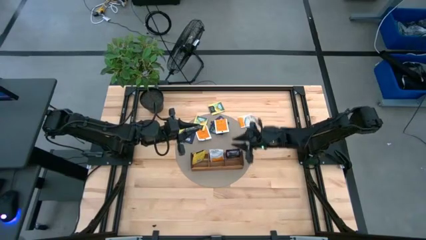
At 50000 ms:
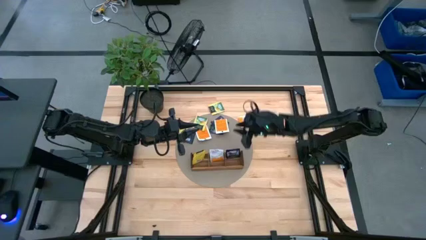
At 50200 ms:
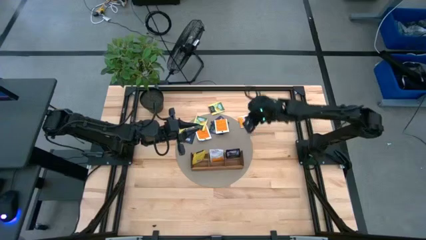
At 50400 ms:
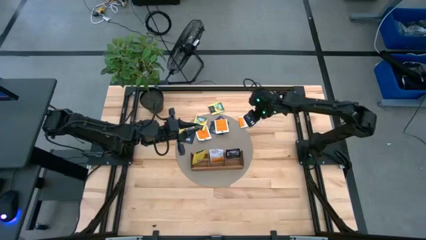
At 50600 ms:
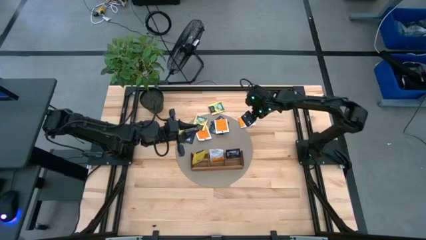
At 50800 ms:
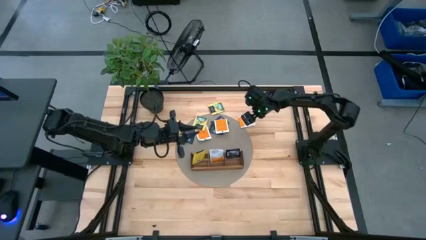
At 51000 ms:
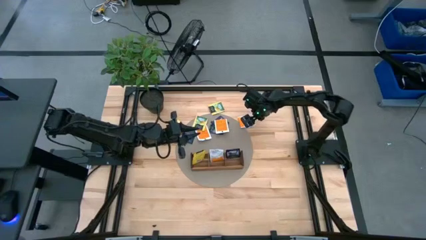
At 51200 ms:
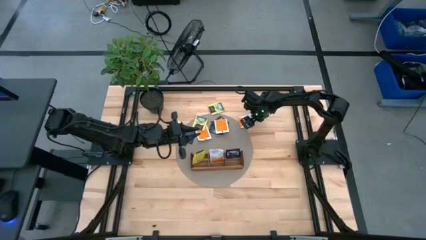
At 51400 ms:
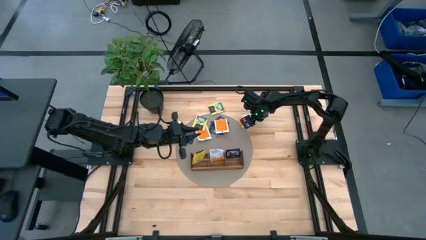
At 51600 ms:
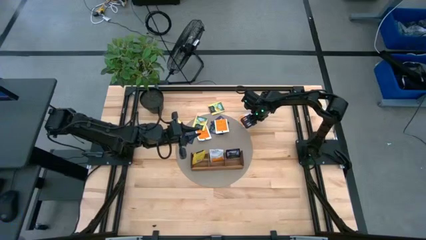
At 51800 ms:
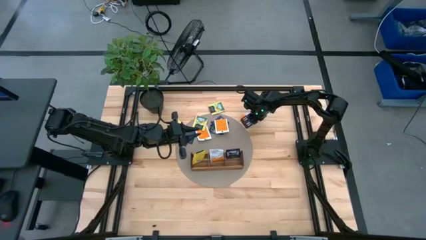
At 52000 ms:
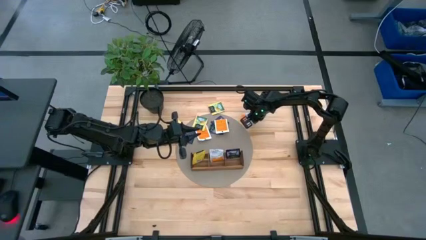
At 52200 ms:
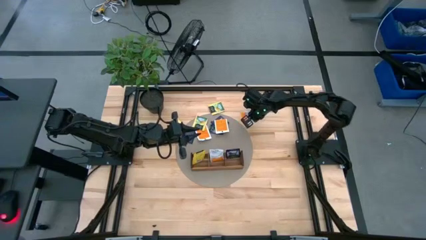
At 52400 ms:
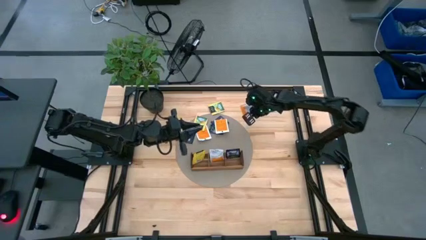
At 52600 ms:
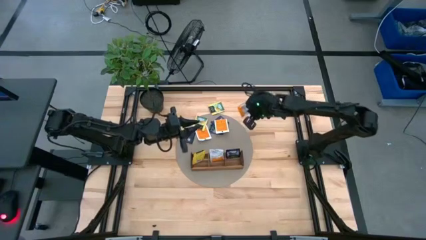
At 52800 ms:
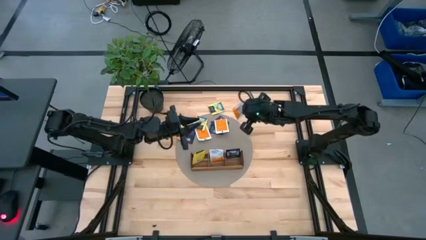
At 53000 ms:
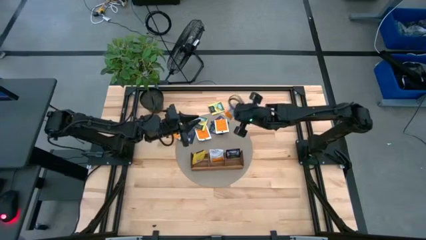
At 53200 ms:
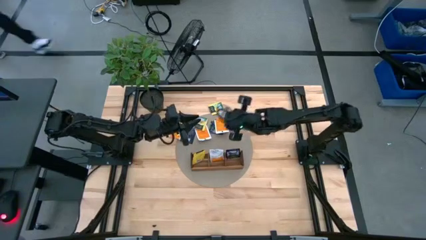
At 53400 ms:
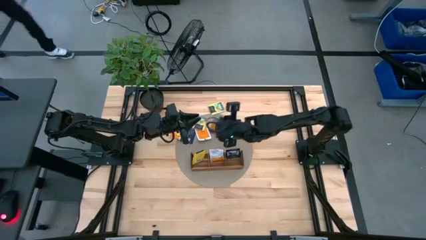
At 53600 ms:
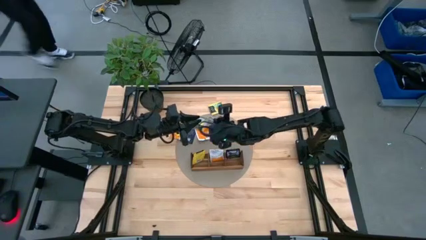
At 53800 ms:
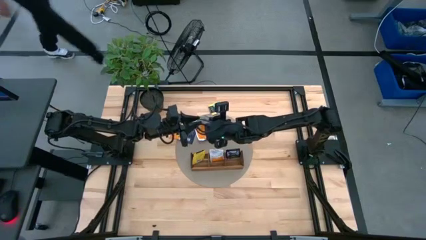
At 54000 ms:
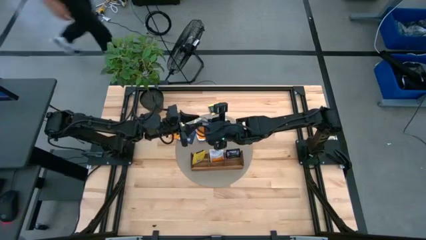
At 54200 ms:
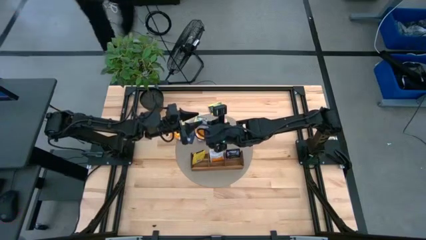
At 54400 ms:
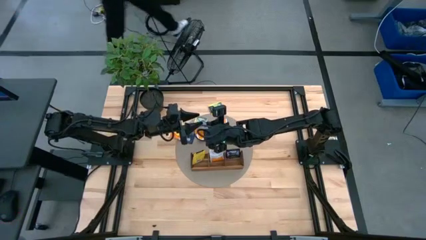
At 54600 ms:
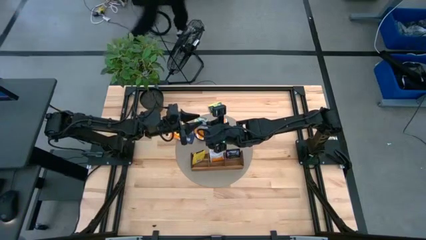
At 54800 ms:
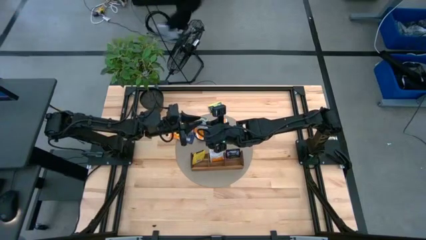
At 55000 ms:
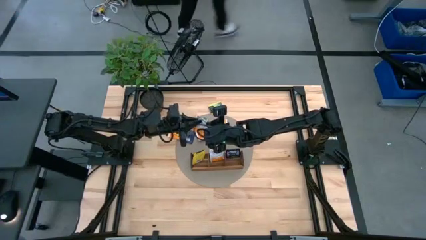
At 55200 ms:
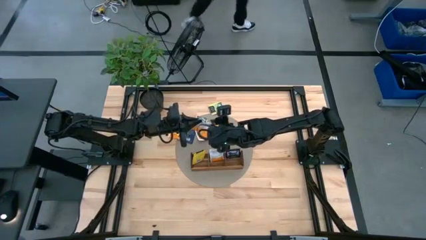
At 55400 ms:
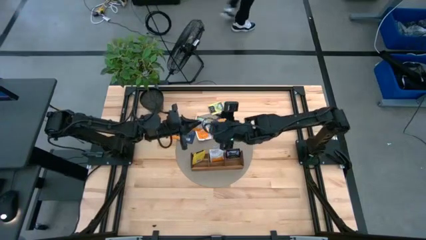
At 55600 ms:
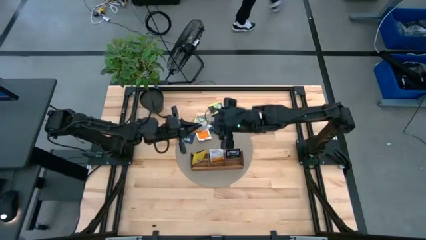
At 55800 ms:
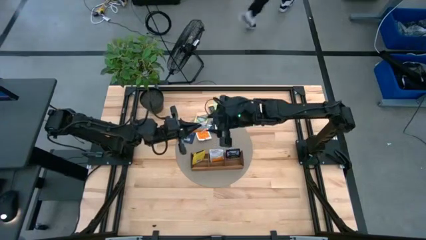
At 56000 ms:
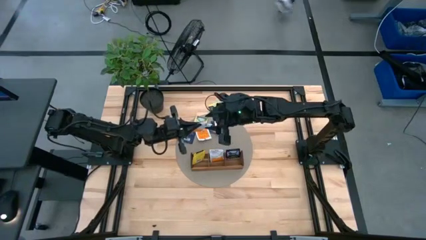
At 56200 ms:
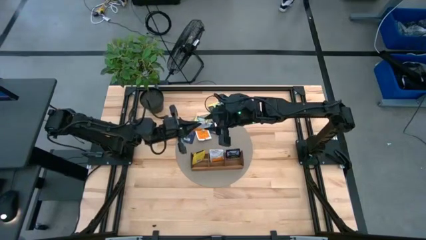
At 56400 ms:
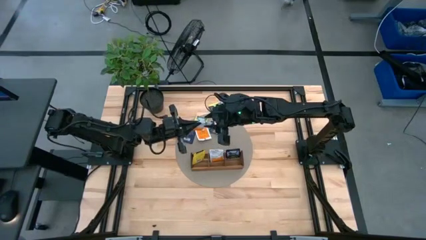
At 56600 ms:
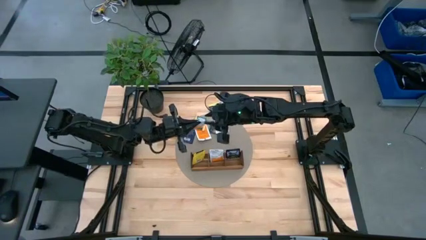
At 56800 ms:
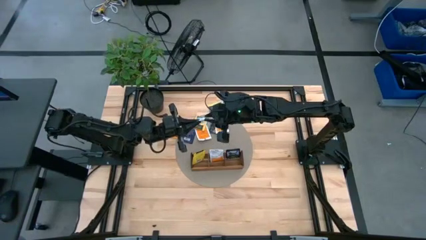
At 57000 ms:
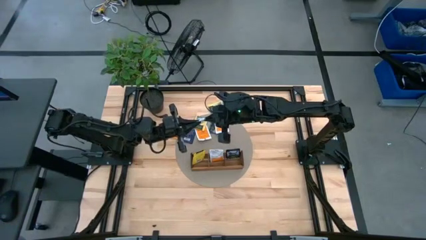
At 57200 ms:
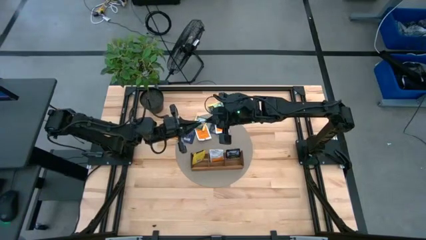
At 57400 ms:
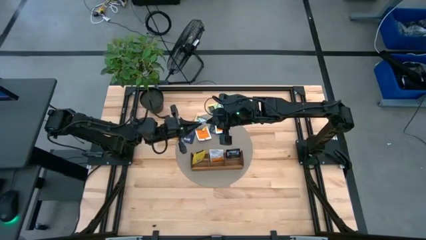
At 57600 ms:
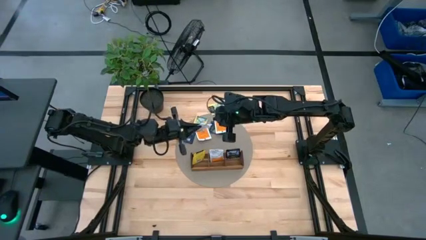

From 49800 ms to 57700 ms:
Task: Pick & Place Tea
Put the orange tea bag into the middle section of the wooden organizer

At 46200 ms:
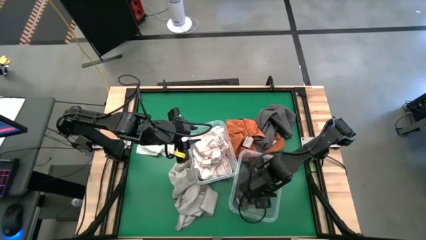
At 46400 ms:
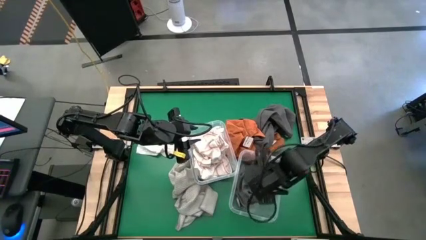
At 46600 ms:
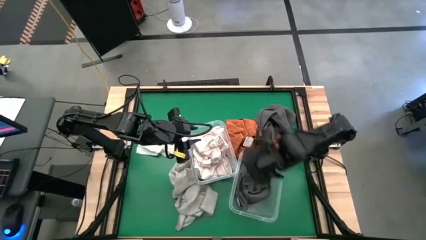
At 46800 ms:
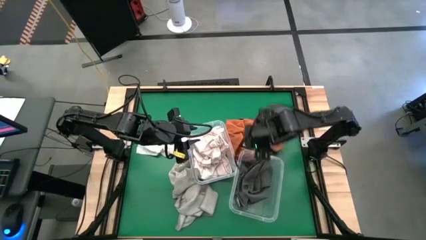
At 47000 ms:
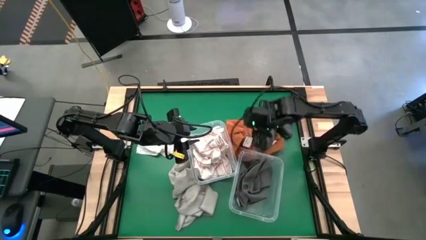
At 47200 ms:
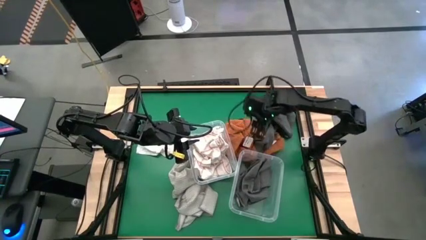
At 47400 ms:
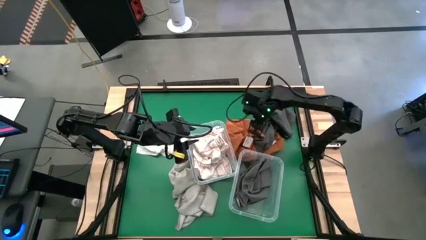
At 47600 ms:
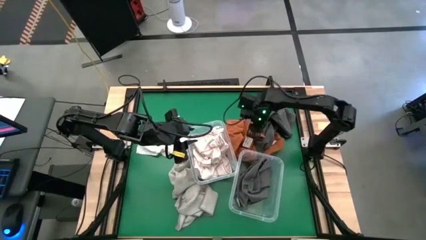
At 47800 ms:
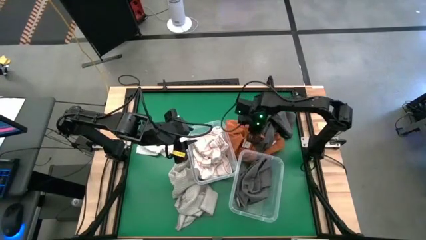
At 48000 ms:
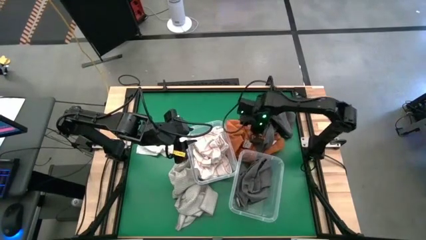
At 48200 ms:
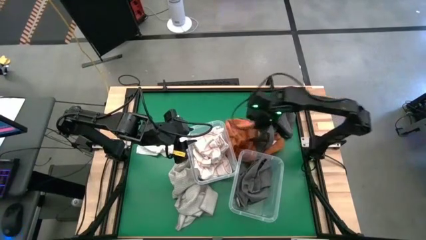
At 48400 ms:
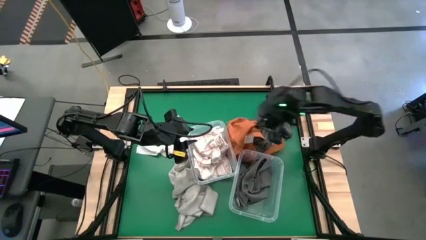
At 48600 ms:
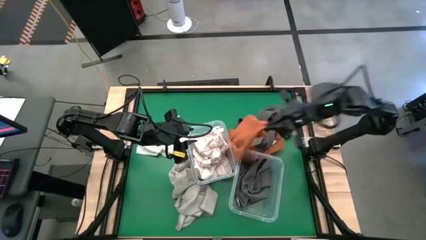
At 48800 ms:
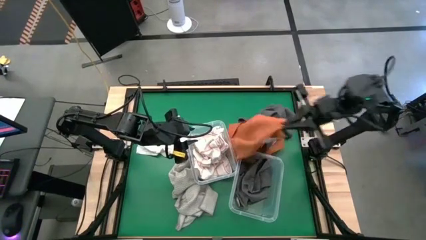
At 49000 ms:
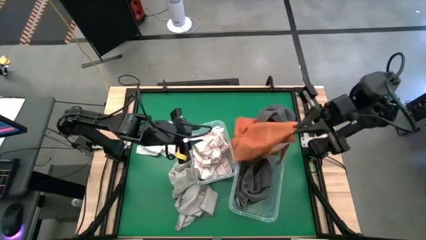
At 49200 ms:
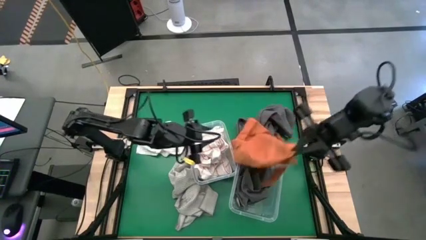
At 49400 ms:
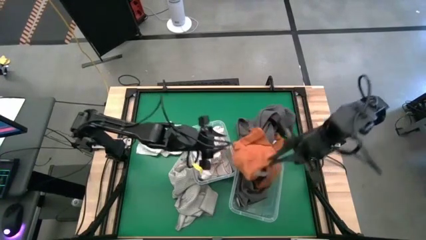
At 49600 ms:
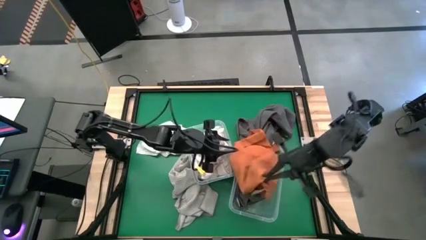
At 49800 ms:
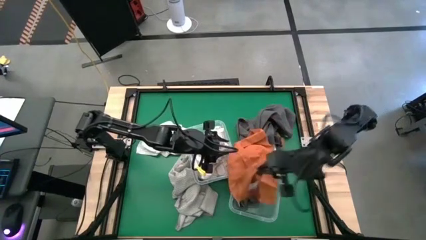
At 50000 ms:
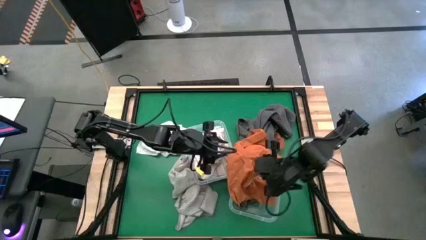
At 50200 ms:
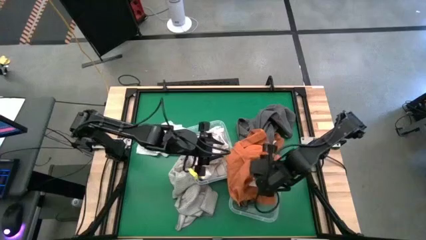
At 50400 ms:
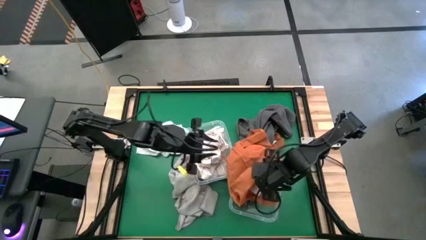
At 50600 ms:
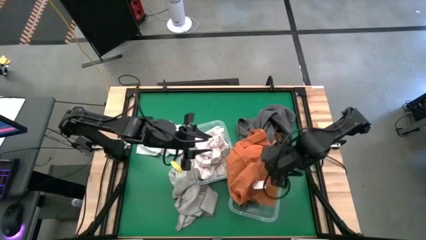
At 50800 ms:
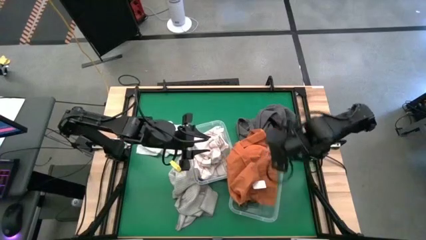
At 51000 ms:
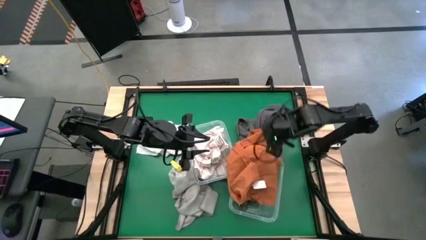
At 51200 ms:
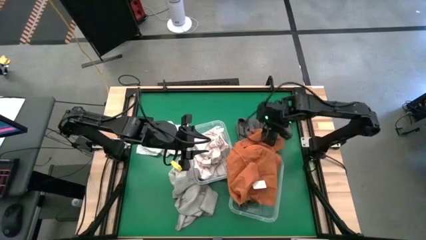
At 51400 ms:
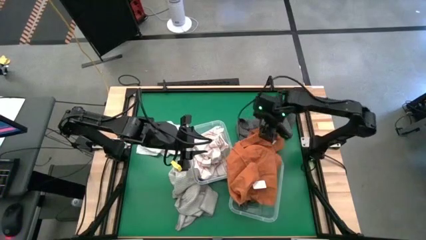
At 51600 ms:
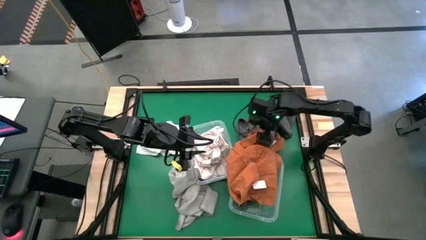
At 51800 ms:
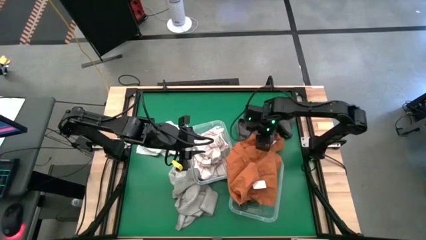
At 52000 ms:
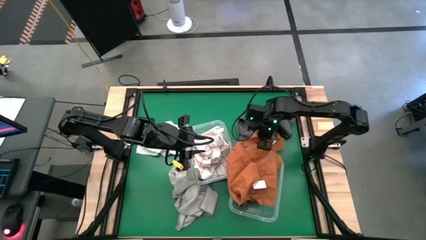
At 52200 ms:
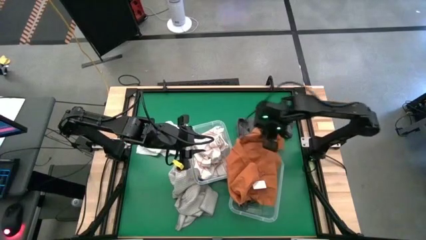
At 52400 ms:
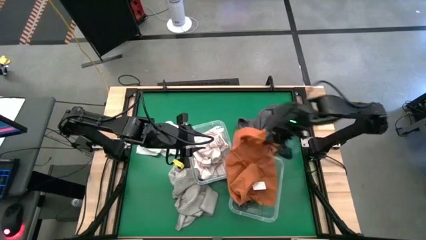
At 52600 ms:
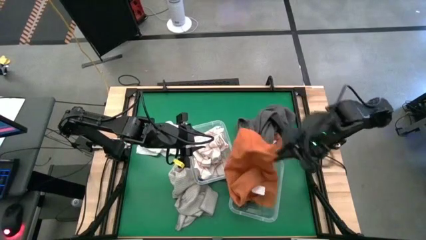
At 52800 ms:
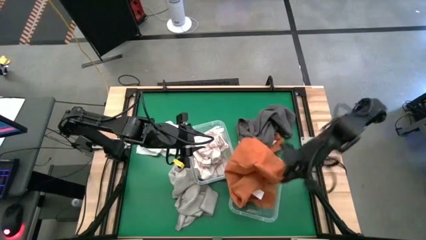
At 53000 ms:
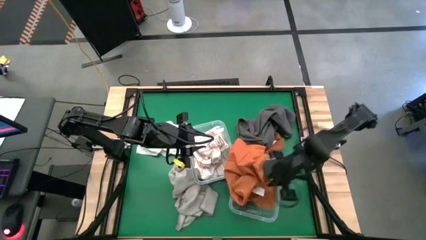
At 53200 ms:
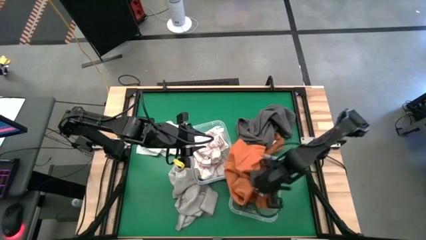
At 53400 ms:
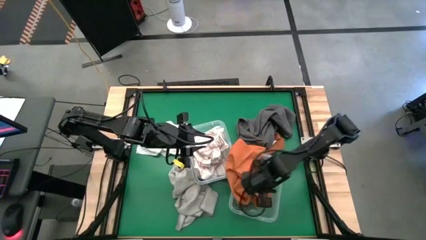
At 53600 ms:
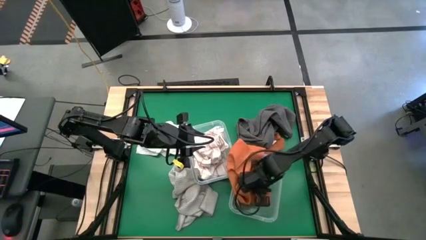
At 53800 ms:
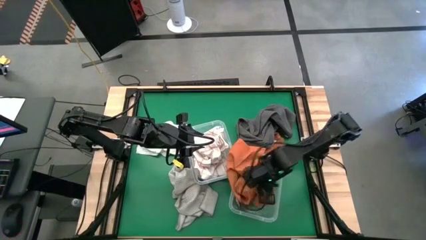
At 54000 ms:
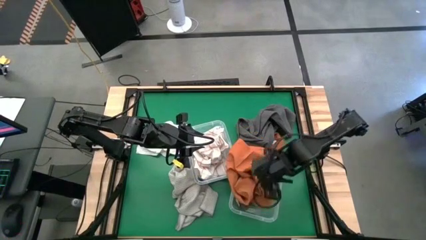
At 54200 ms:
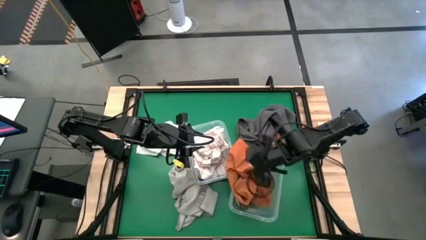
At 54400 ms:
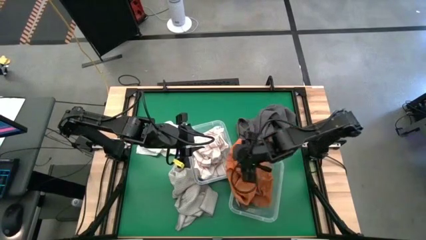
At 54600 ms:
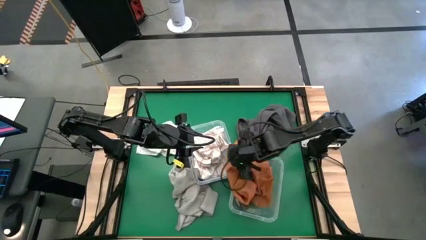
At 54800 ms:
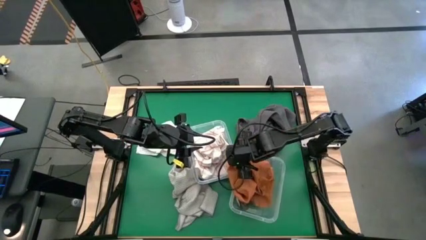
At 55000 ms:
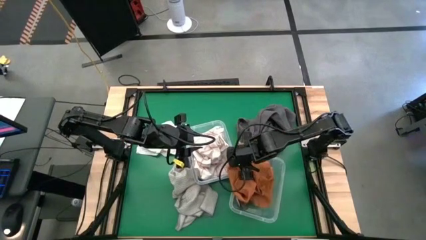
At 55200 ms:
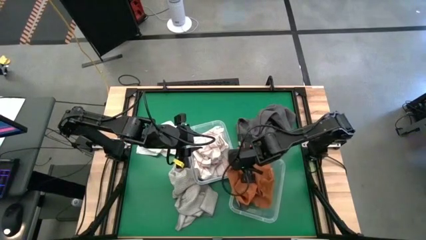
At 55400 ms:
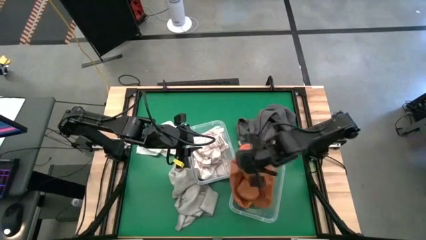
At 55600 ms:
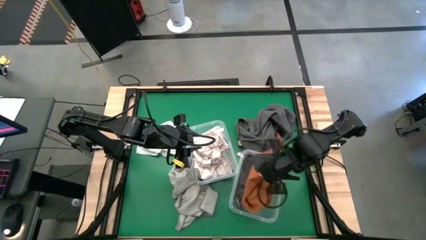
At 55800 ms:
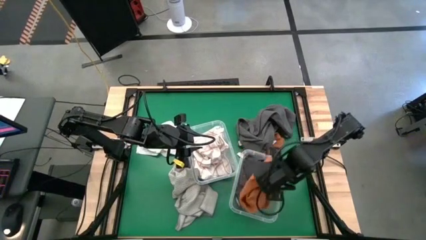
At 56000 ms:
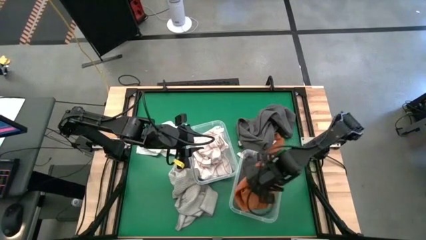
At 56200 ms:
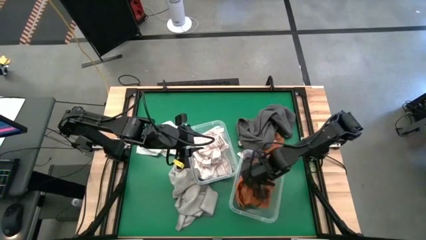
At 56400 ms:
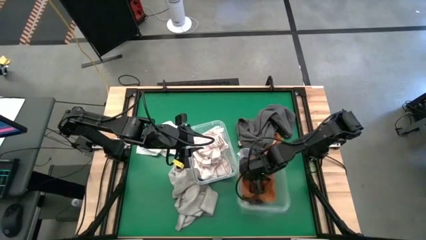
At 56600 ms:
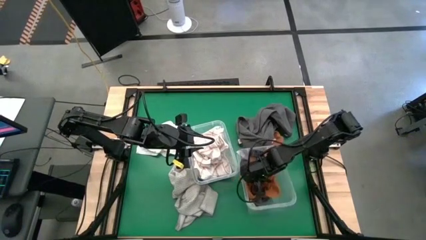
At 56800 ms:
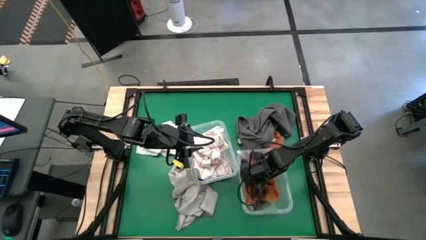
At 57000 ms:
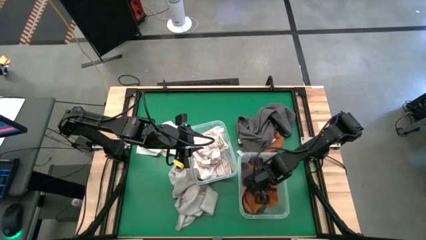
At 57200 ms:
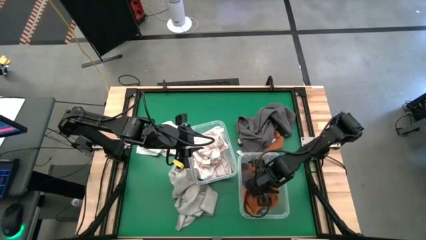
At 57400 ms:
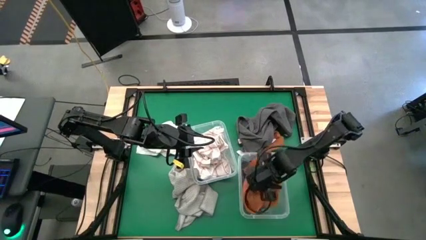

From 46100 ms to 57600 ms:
Task: Sort microfiber towel by color & place in baskets
Put the orange microfiber towel into the right transparent bin
